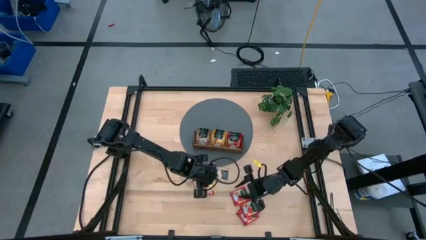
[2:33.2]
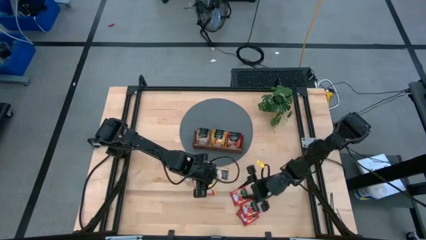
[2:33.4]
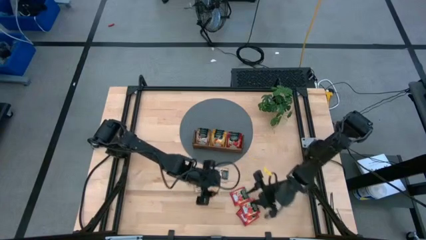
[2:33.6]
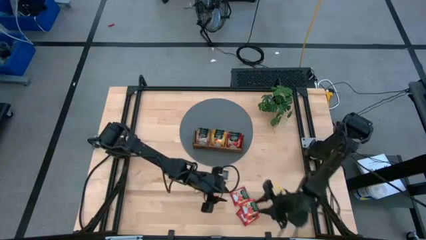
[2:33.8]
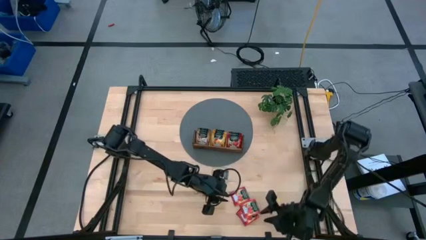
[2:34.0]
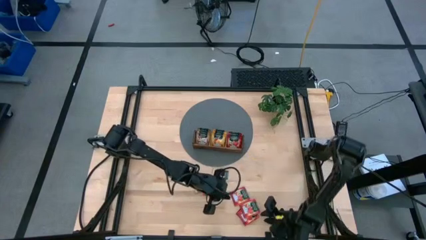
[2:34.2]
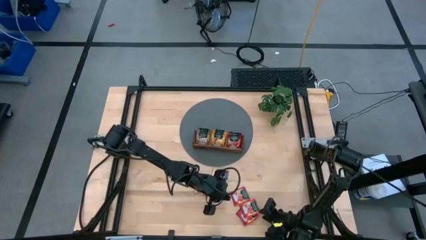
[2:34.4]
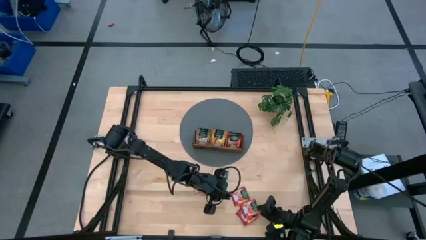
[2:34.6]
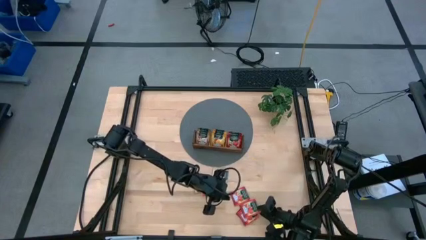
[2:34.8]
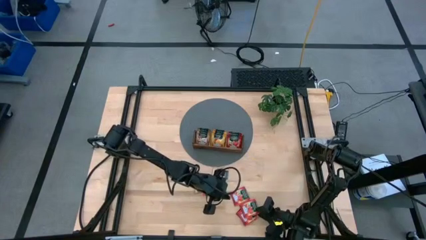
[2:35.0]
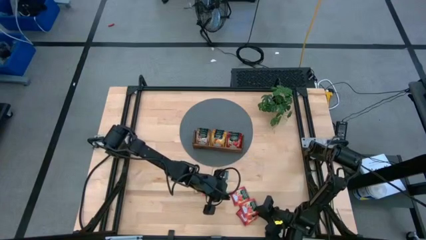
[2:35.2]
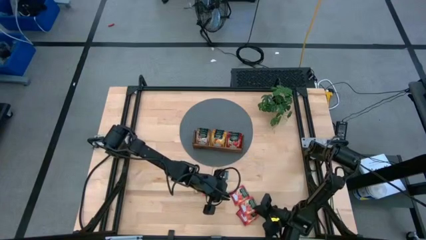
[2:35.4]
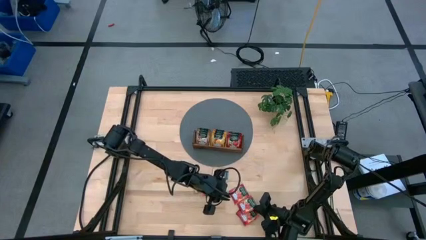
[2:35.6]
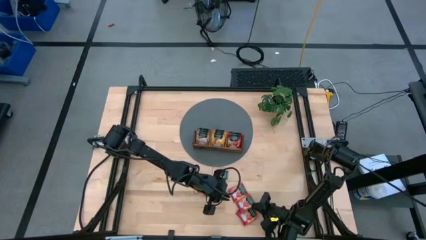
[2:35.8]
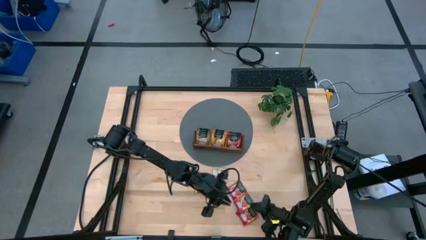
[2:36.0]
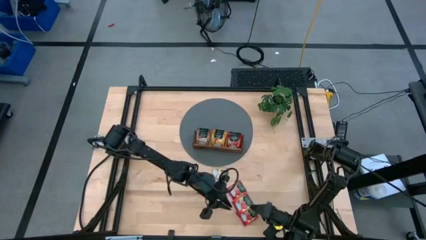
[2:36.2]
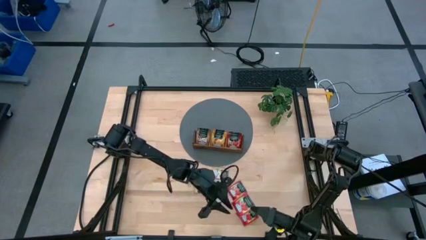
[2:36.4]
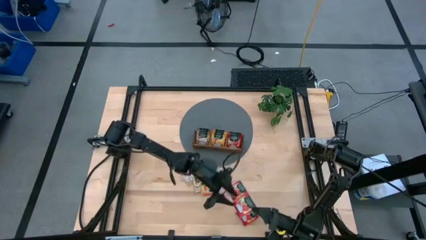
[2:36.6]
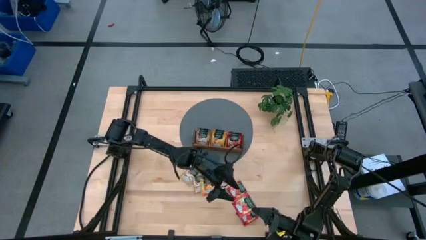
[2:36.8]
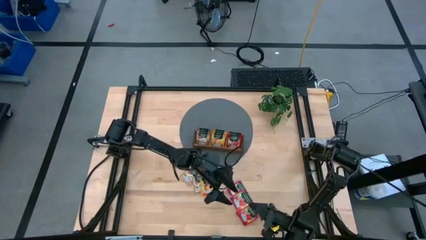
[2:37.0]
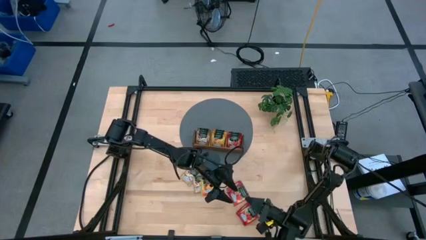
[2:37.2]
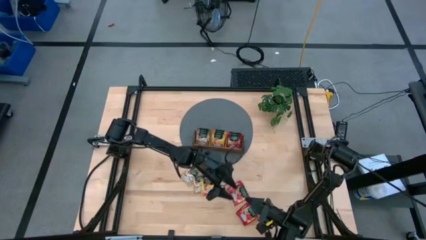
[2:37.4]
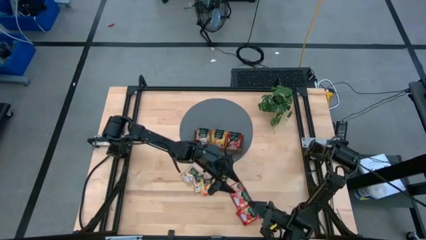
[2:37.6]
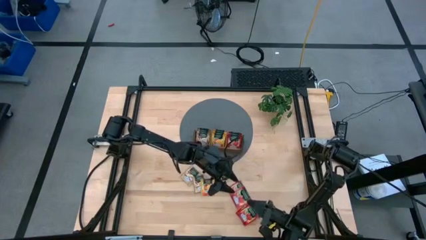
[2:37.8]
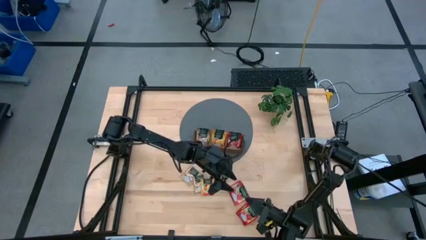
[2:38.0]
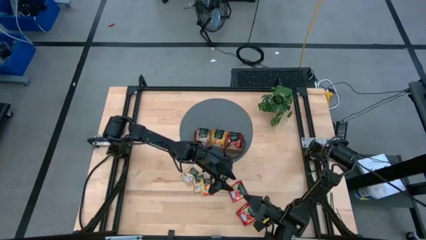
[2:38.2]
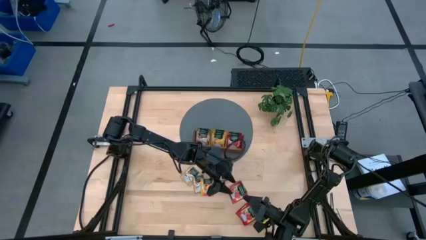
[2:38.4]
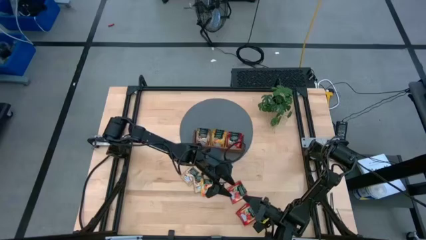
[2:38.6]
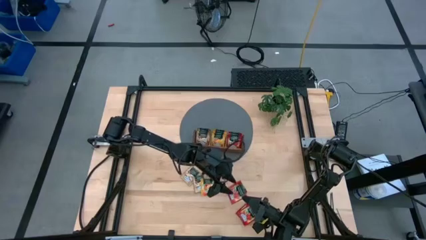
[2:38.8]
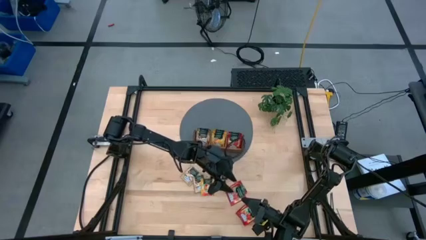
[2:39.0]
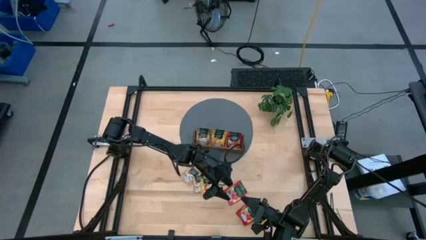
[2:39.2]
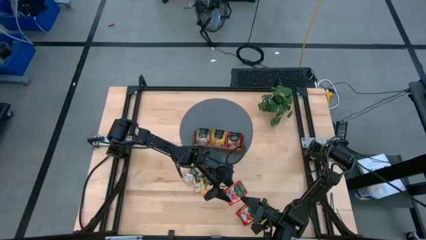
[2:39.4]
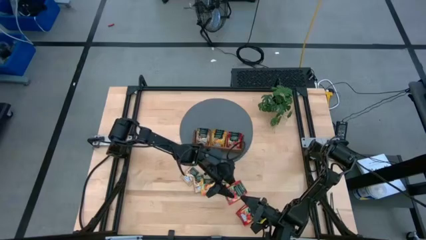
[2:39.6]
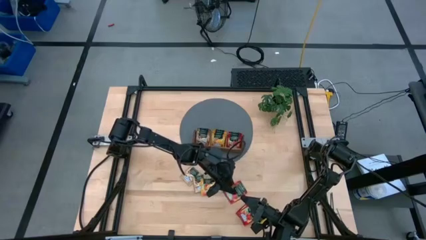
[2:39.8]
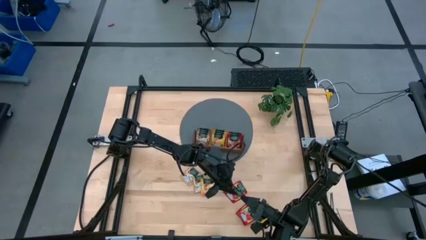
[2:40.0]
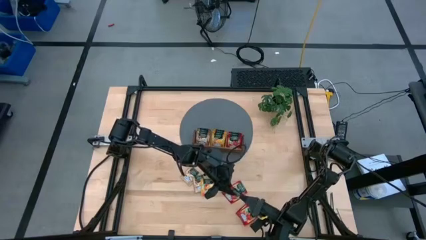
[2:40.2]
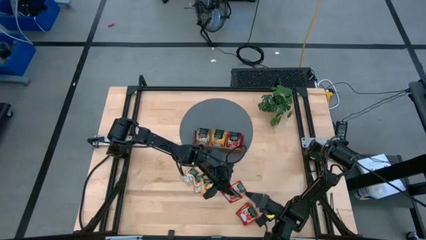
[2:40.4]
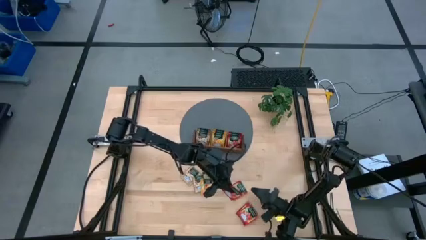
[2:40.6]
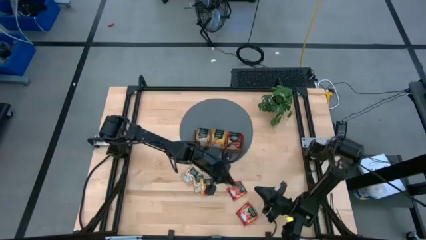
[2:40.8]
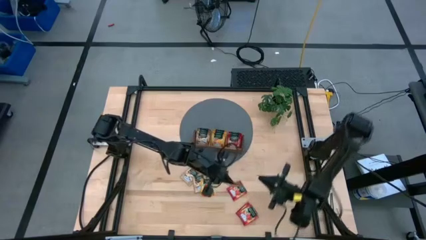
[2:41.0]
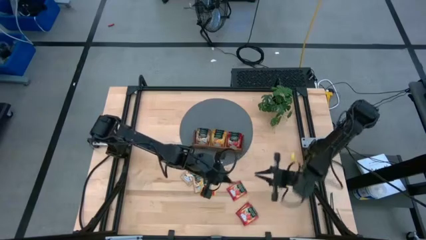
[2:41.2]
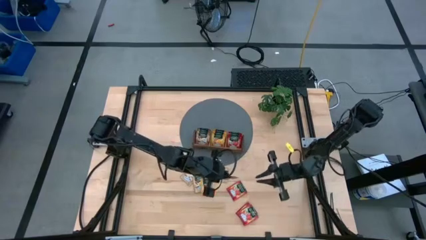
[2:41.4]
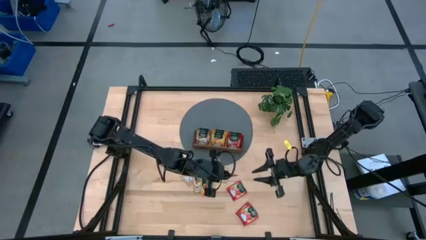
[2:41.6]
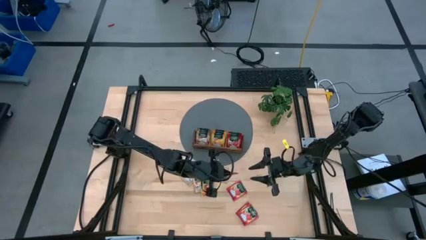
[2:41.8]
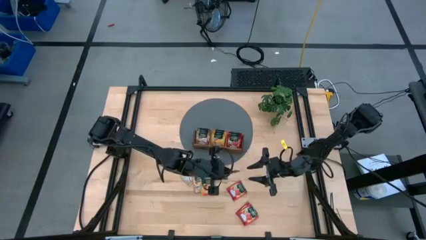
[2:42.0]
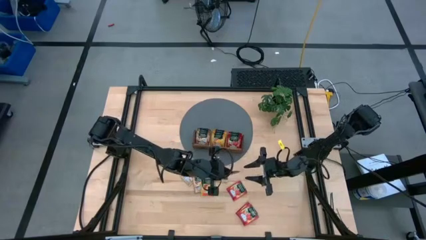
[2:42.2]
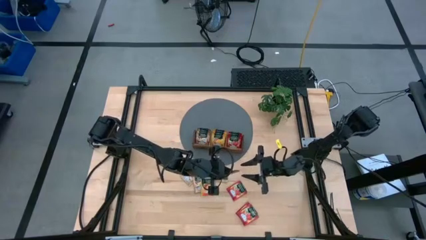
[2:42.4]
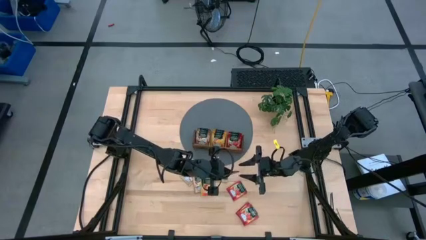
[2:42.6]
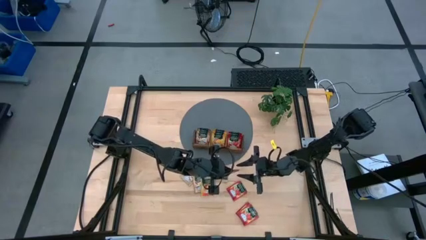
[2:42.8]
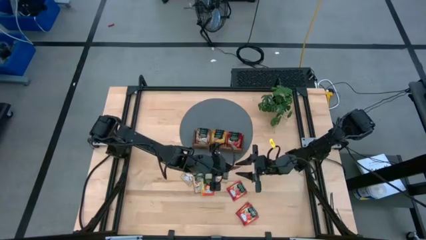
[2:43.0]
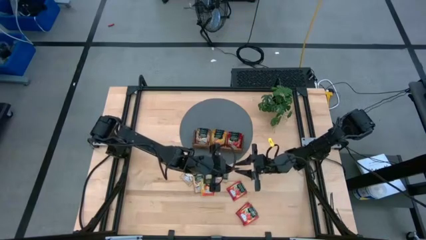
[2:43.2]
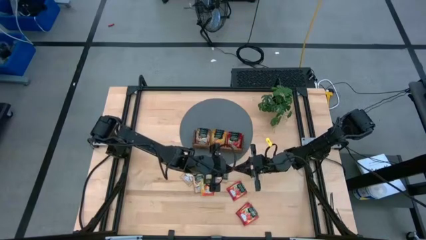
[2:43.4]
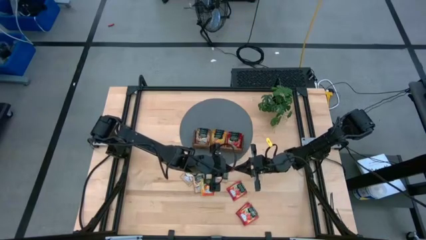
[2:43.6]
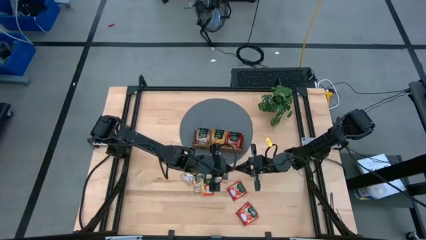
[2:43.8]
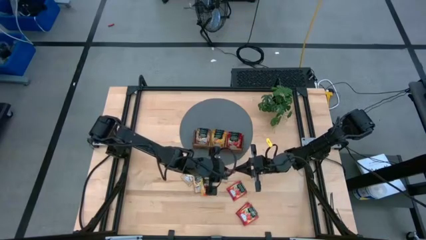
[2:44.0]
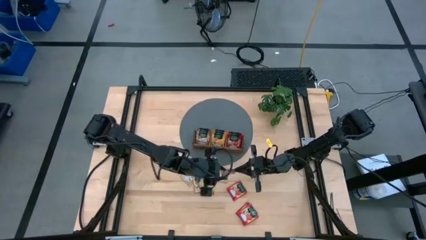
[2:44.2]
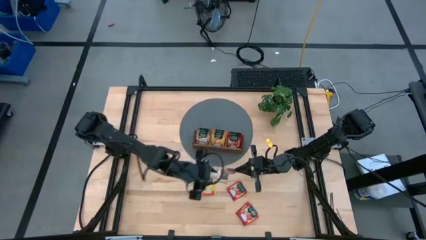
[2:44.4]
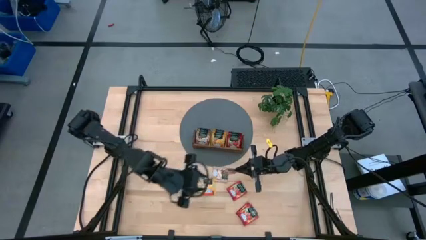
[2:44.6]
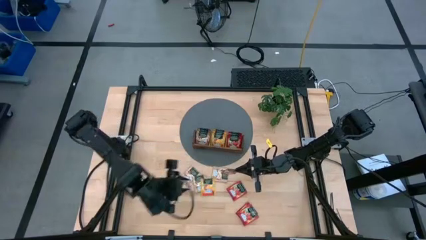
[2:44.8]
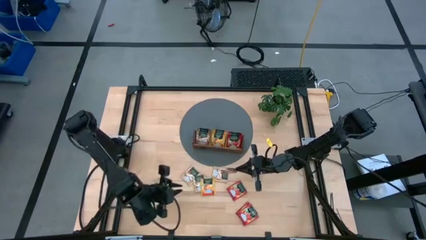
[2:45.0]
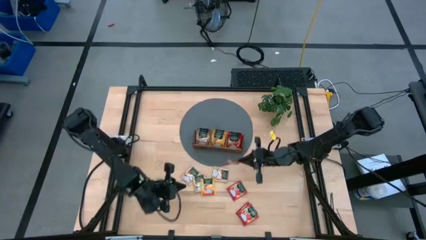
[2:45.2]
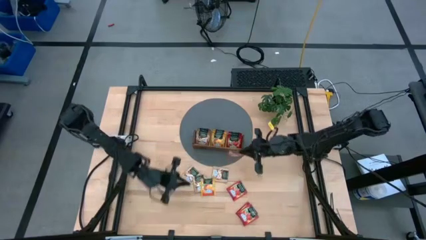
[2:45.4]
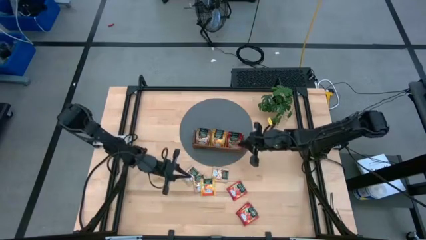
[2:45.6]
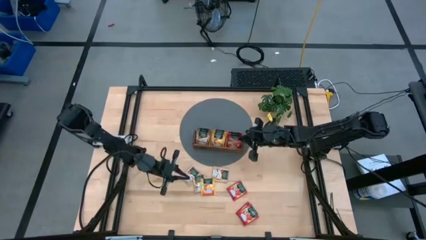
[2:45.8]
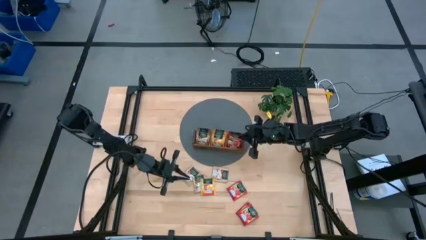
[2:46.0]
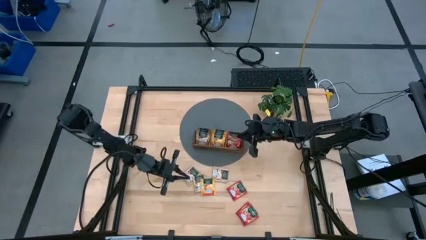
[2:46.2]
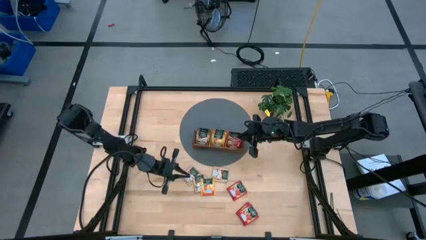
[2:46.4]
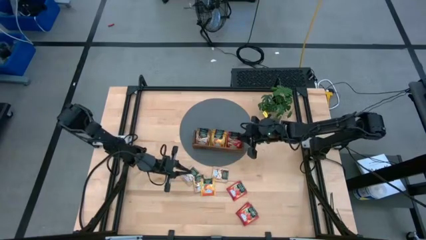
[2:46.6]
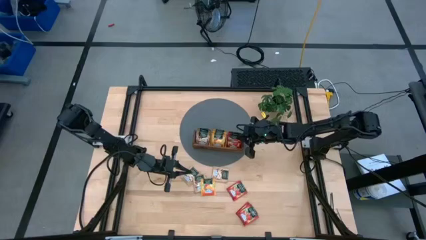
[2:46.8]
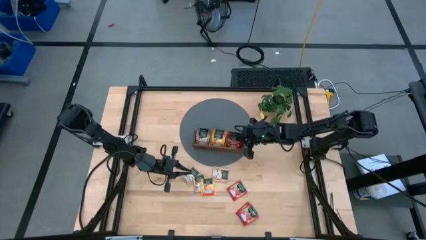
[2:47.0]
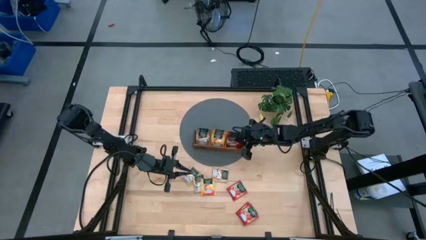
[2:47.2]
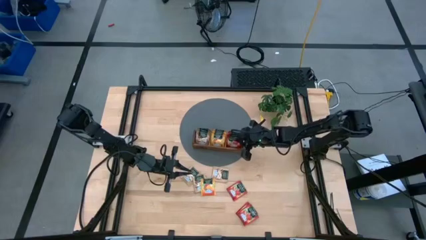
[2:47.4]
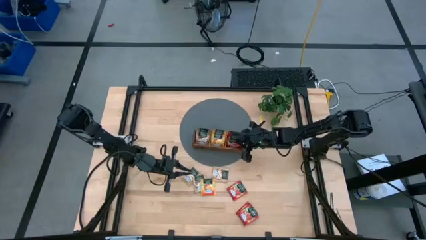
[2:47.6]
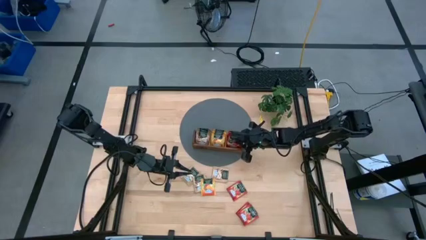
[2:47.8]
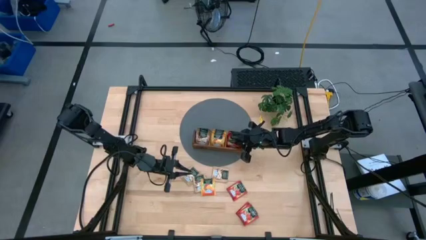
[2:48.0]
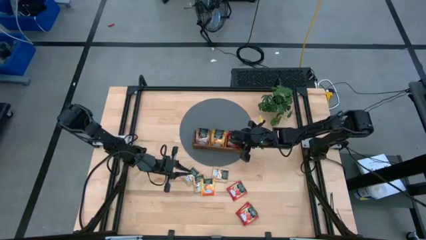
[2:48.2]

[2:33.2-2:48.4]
Task: Pick & Place Tea
Put the red tea bag into the right section of the wooden organizer

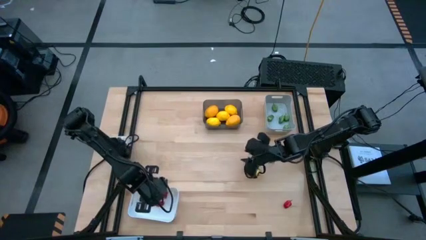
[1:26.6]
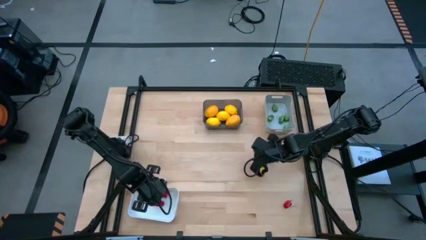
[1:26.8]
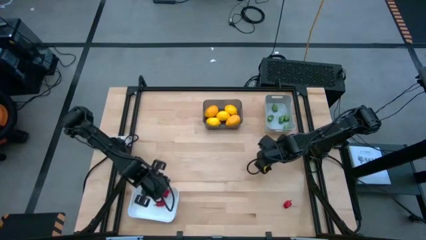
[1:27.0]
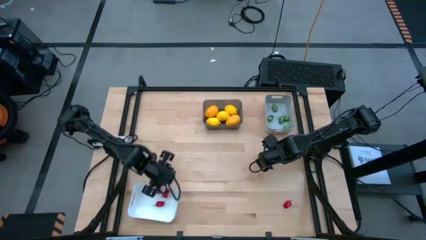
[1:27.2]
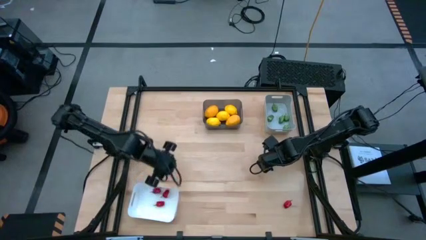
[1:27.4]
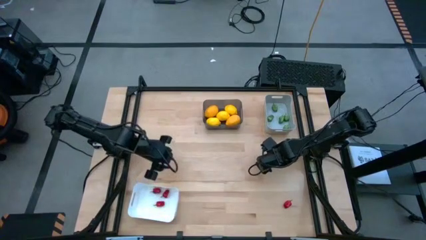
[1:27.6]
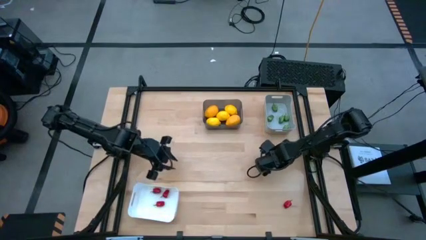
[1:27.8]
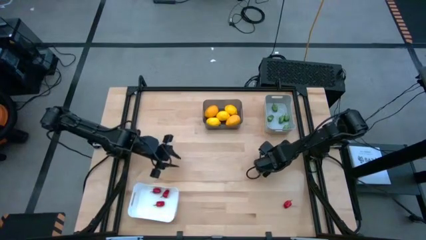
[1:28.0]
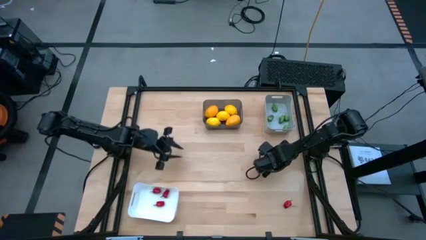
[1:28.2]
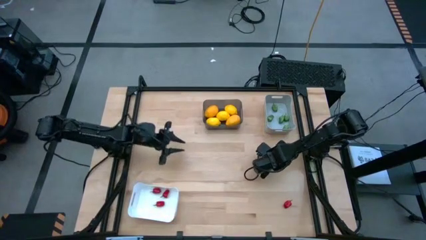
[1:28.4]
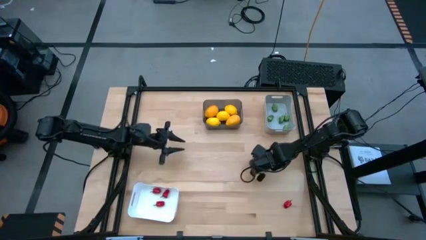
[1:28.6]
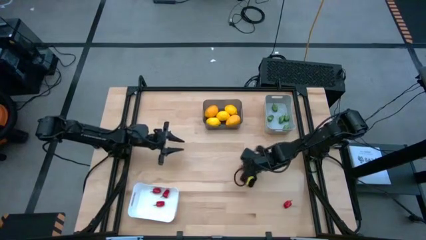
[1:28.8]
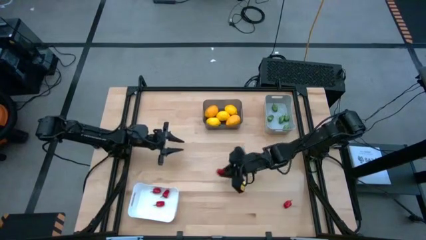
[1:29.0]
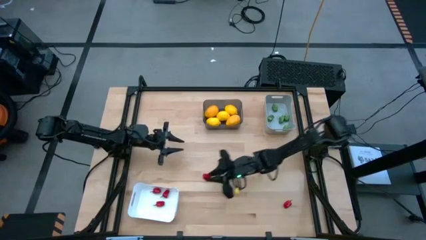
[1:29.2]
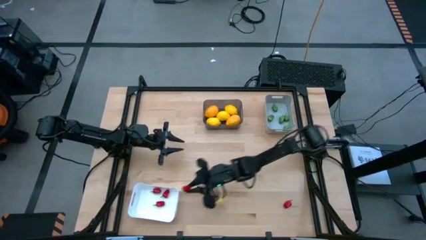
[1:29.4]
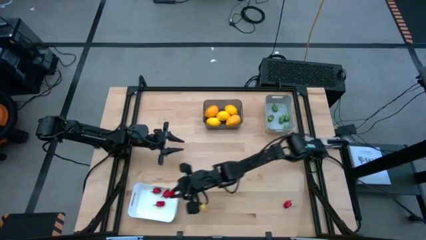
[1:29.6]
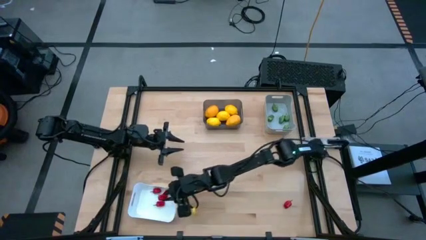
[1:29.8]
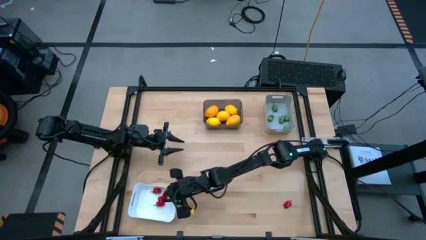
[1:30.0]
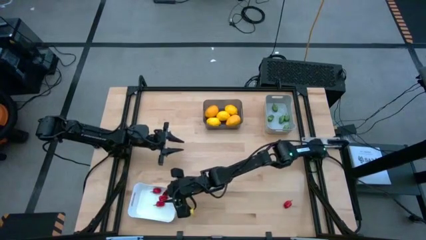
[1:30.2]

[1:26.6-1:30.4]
Task: Sort produce into baskets
Put the pepper into the white bin
